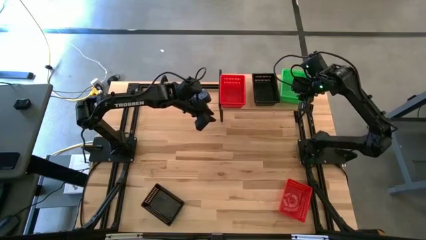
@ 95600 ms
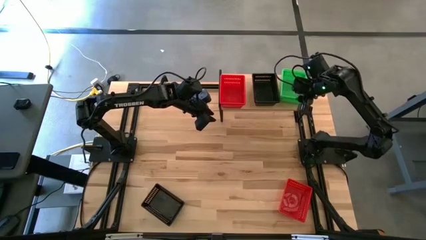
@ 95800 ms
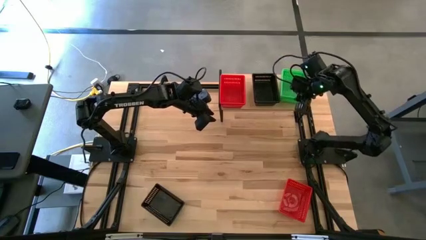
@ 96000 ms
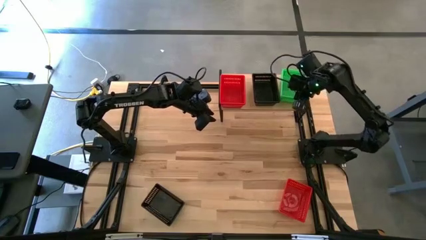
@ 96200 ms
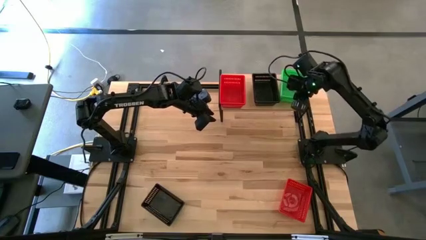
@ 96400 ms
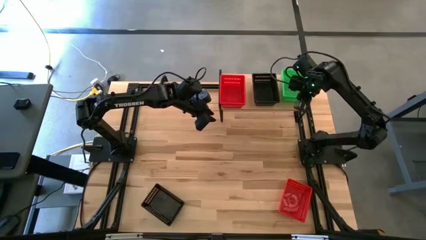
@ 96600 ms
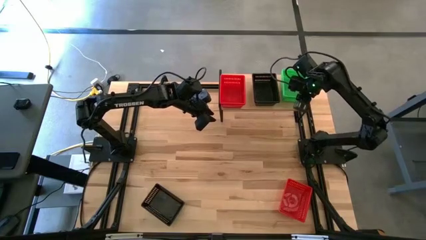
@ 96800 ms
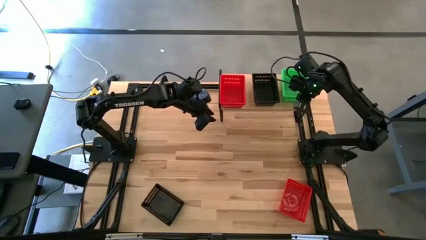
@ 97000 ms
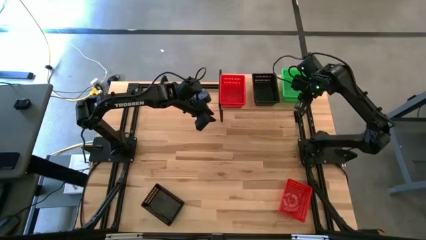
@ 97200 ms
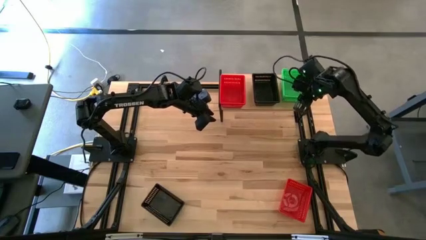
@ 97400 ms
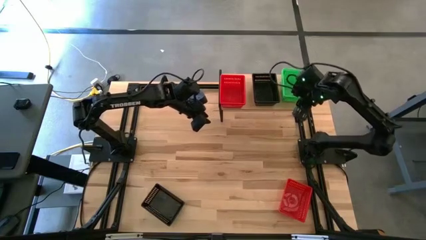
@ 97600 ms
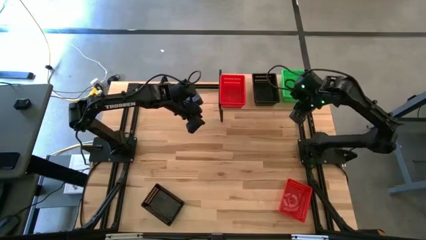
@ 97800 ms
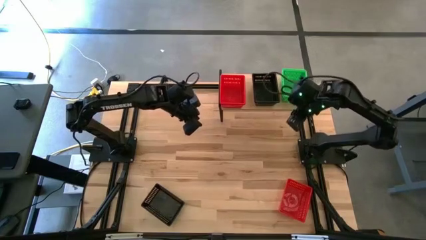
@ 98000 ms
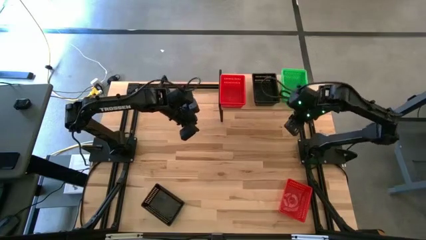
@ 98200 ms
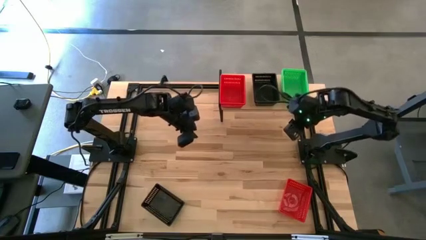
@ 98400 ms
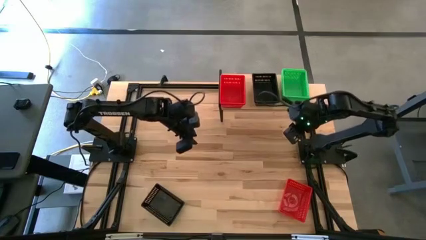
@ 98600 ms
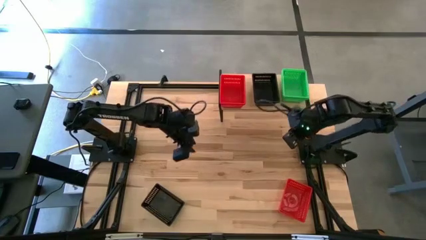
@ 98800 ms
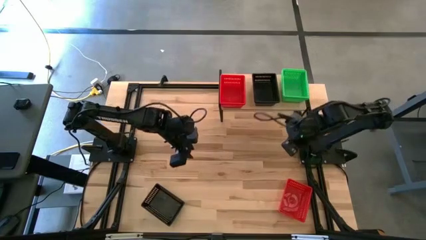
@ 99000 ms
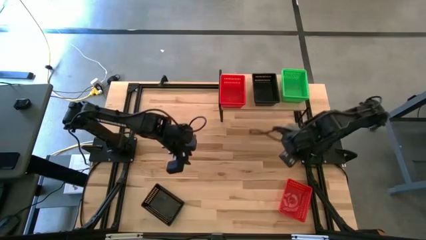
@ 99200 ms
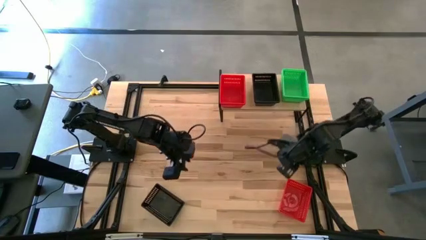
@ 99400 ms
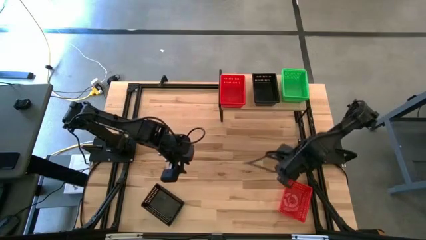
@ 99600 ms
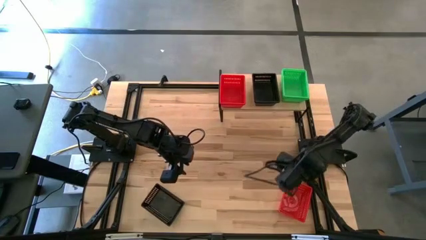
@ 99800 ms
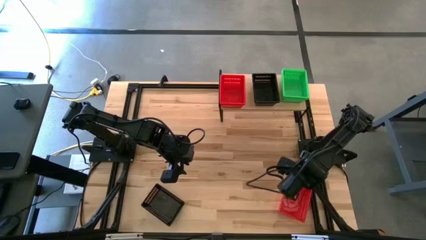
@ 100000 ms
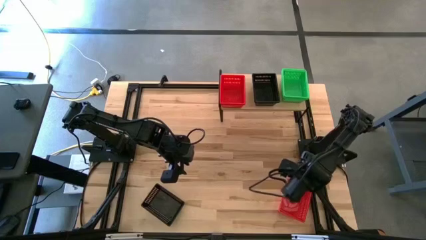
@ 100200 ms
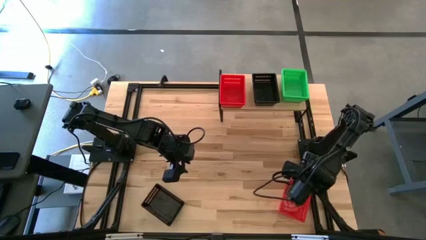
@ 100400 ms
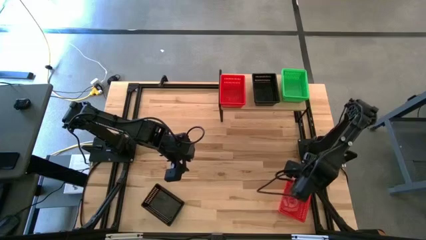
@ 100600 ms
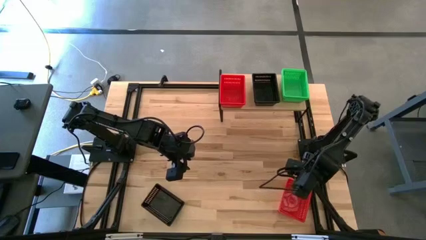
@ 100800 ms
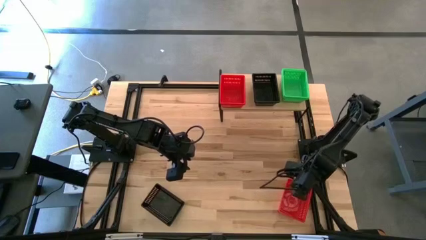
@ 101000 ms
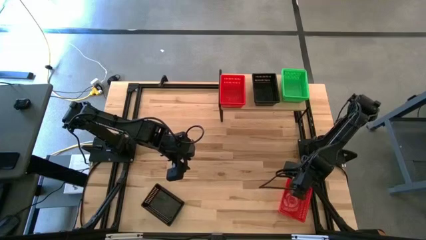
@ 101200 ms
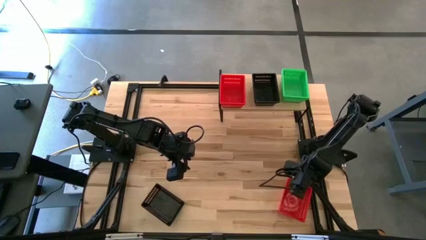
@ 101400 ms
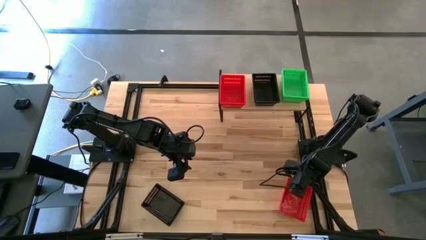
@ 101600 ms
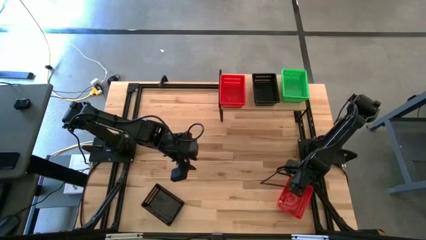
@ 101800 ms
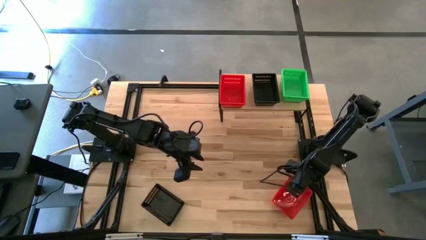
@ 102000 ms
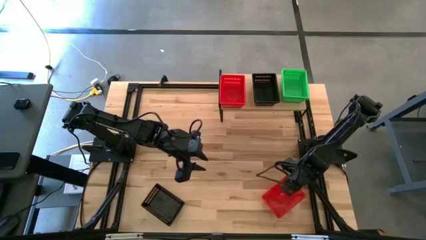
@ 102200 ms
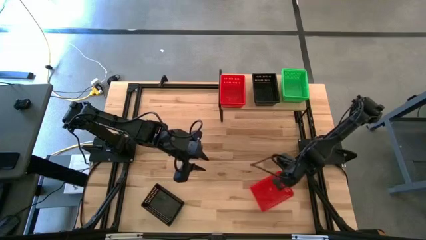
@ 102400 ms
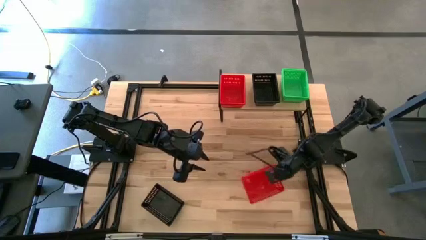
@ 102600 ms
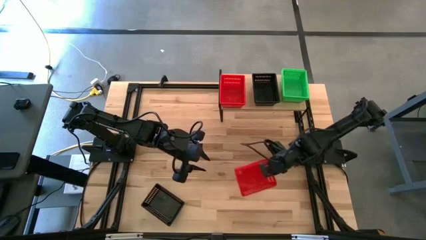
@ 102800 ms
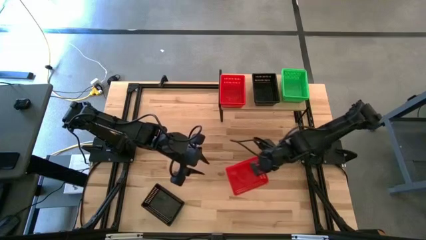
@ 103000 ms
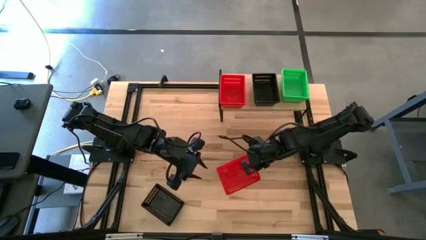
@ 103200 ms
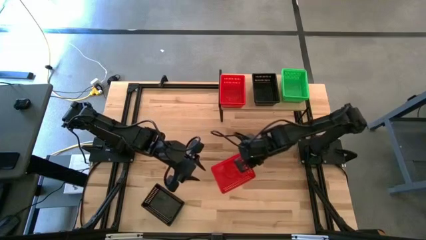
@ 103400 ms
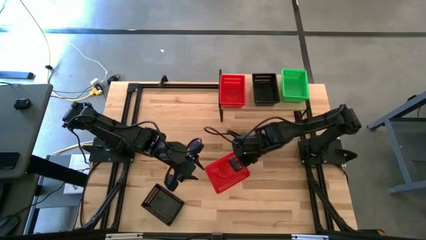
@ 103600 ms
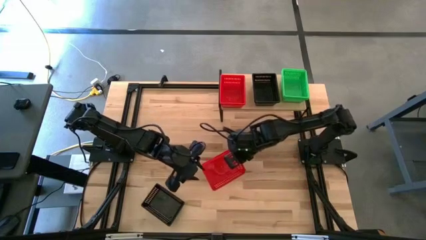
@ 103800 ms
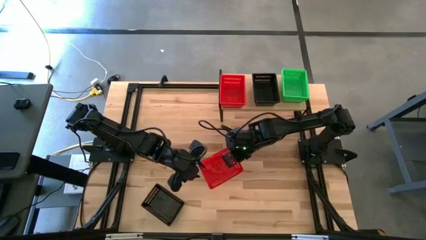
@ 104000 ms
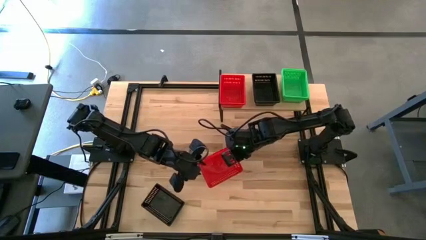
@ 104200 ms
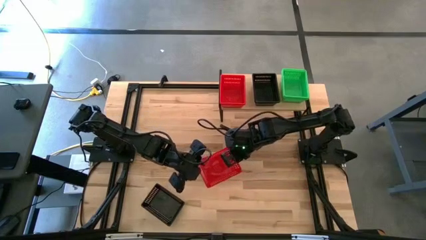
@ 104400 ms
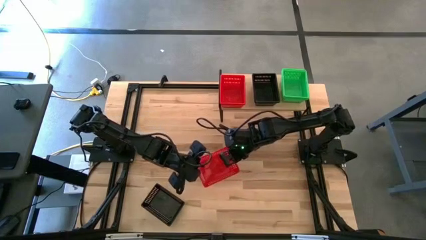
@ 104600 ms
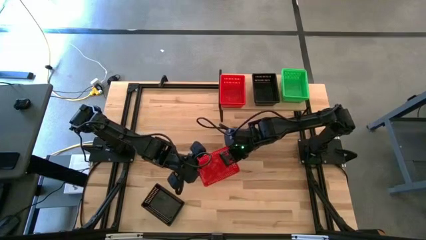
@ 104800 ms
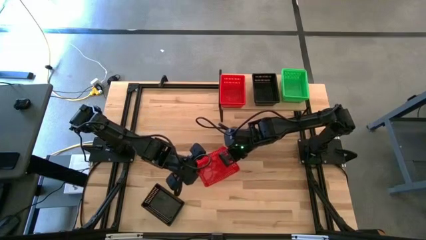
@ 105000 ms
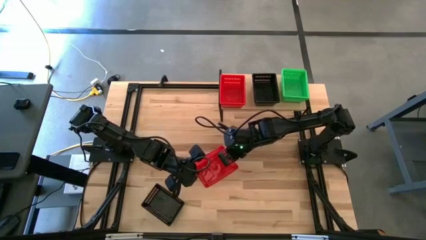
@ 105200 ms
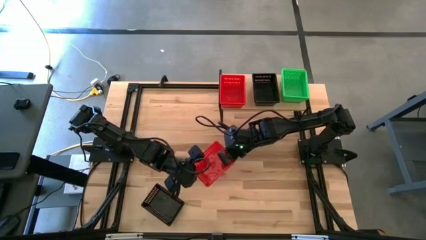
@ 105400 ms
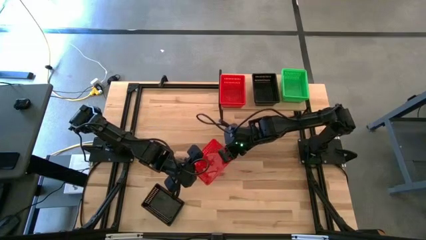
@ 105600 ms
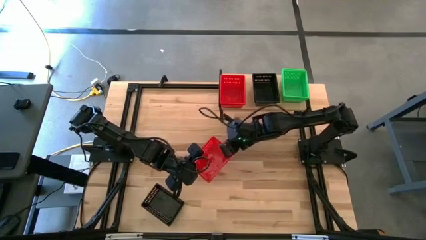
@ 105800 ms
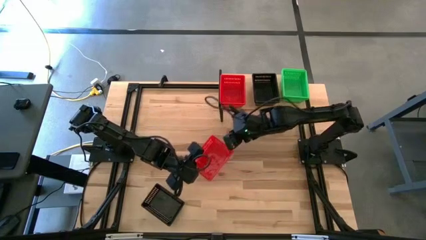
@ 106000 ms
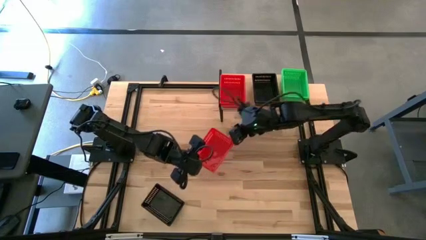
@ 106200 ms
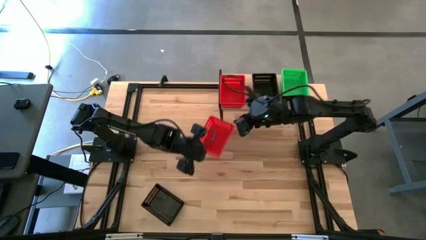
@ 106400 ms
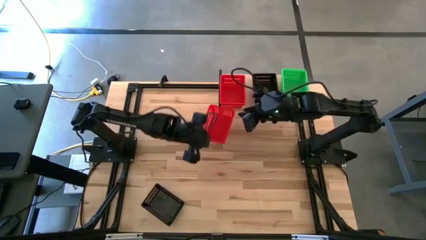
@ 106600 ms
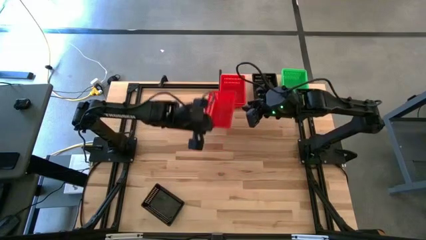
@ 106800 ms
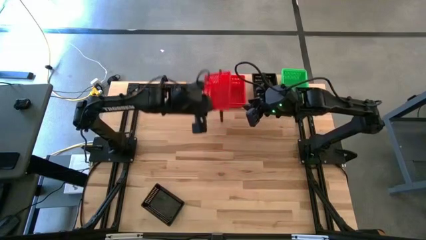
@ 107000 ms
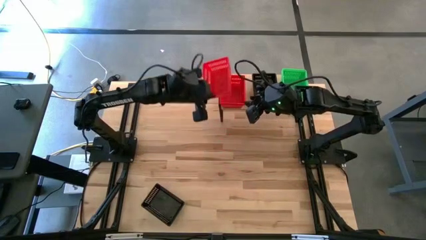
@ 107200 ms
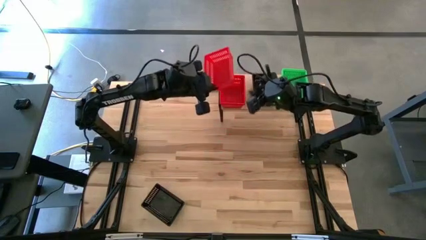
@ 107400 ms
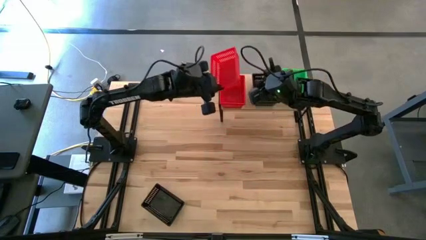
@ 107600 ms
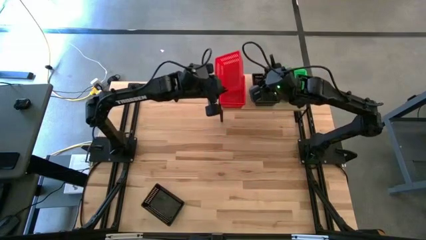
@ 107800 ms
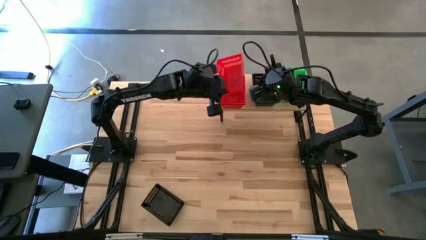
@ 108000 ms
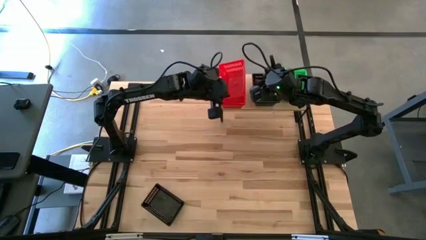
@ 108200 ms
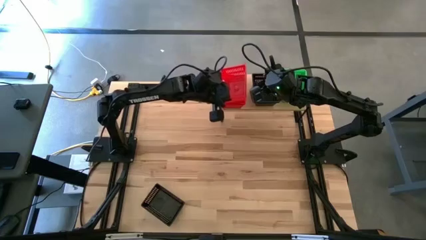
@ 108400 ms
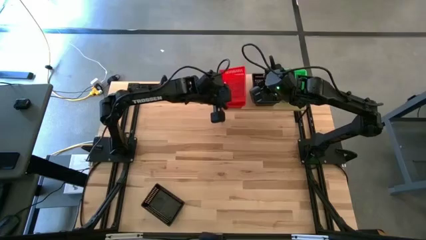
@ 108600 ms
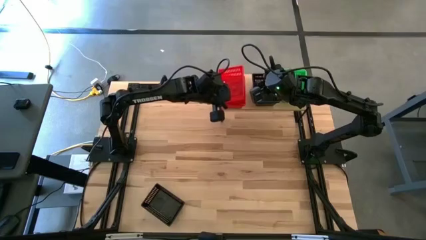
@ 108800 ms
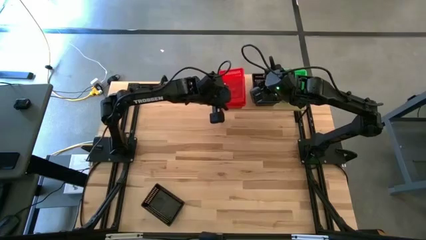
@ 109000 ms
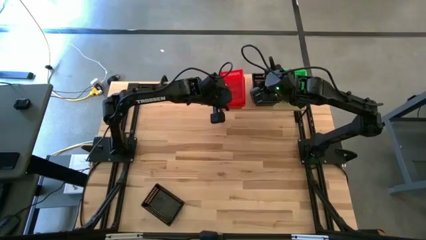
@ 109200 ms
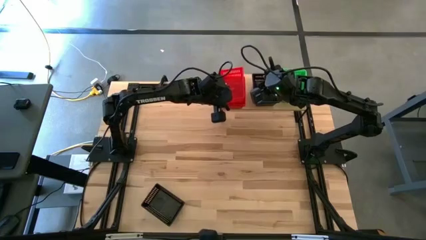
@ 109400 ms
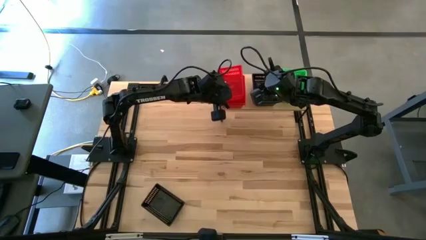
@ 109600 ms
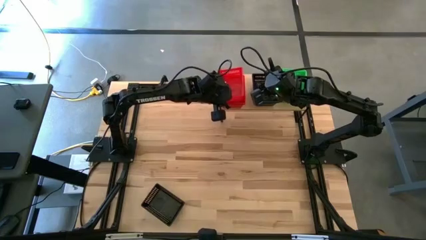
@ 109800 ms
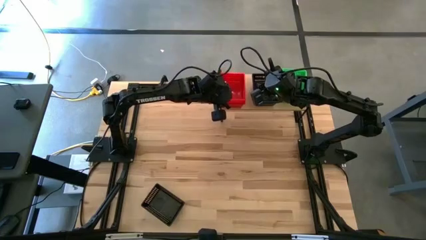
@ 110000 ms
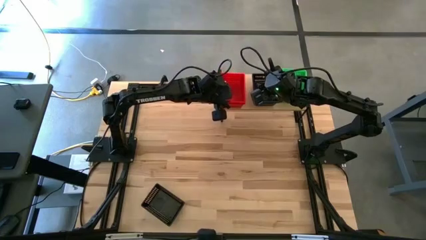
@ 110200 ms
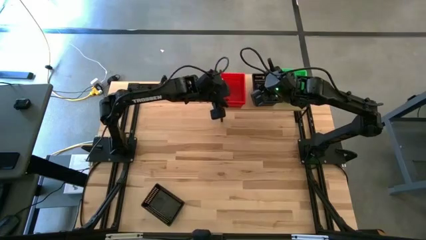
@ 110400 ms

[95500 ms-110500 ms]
Task: Stack baskets on shelf by color
Stack the red basket on top of the other red baskets on the shelf

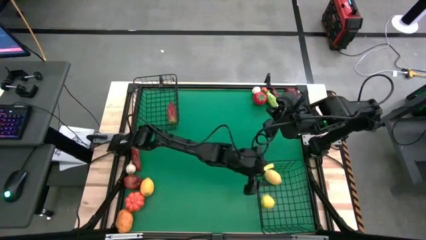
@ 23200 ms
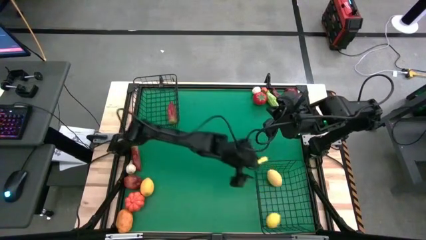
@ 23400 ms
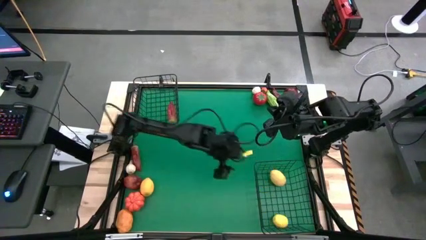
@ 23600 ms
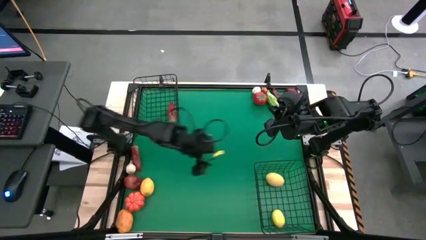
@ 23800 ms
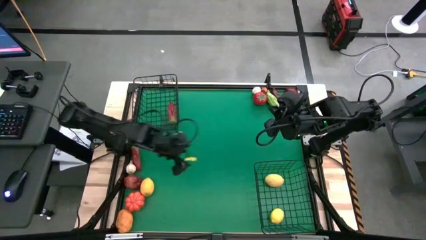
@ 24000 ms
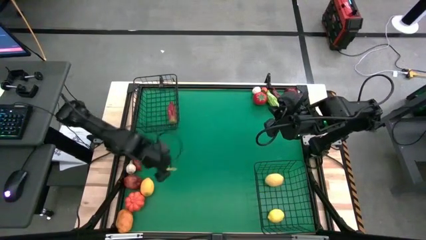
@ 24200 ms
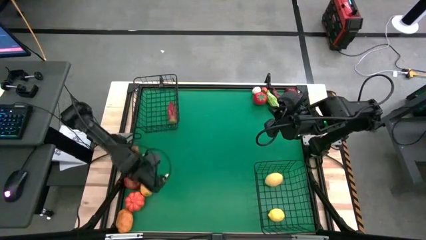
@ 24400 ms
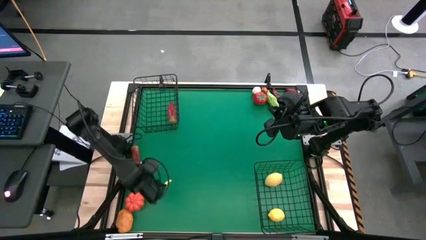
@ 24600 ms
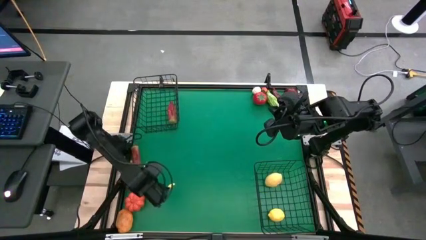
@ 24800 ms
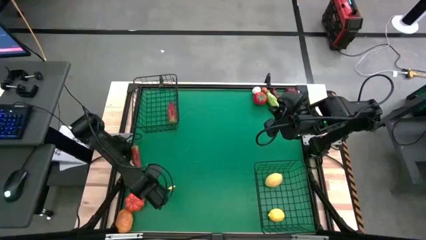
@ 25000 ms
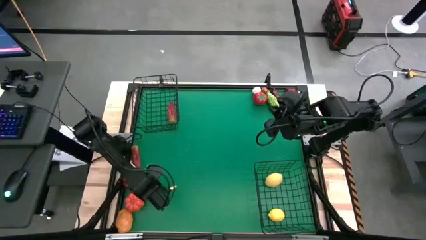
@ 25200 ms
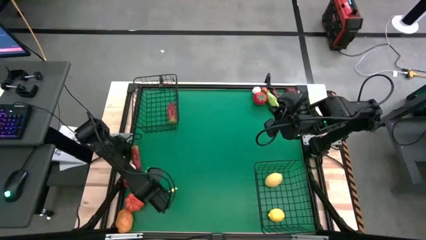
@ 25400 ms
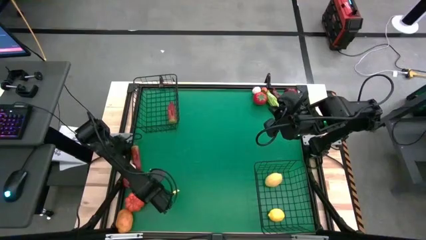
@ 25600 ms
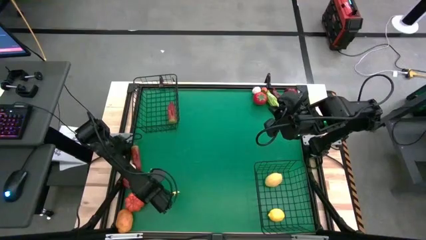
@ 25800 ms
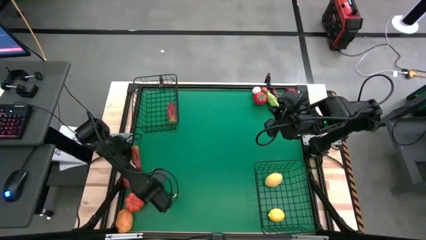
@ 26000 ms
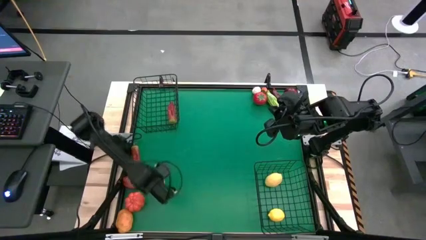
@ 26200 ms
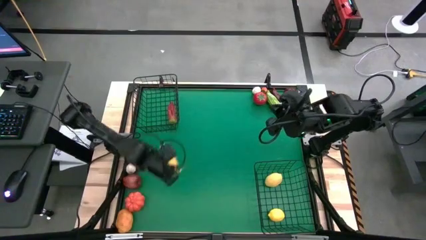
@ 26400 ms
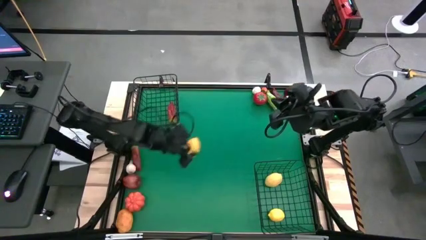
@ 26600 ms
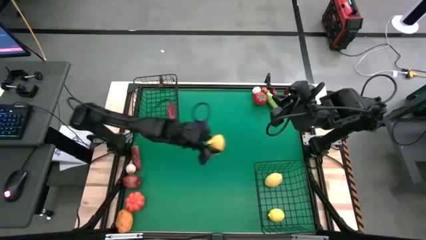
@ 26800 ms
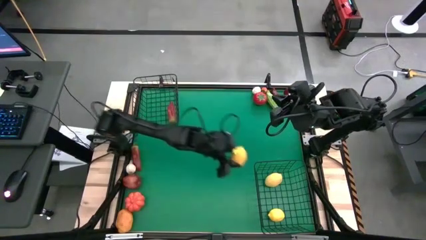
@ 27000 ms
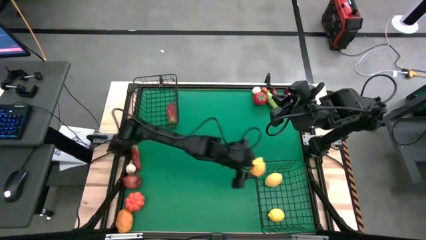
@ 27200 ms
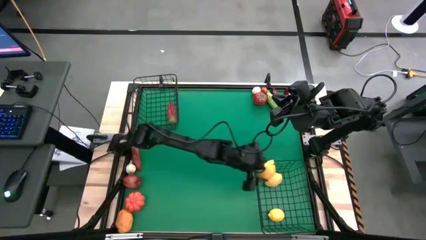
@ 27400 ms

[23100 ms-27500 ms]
Task: Sort produce into baskets
Put the yellow lemon into the bottom black wire basket
